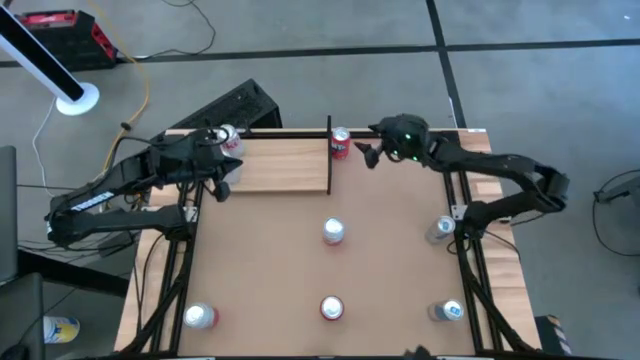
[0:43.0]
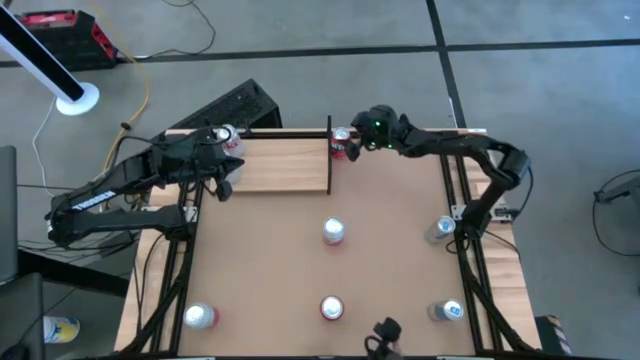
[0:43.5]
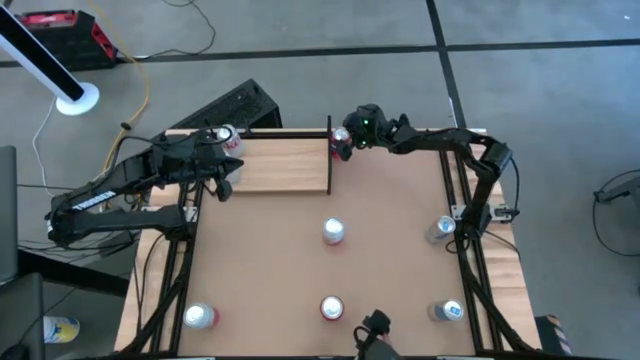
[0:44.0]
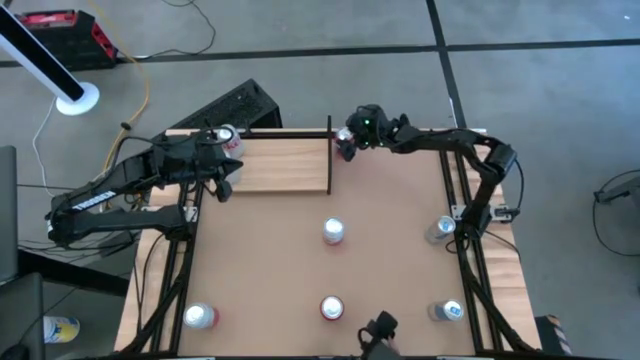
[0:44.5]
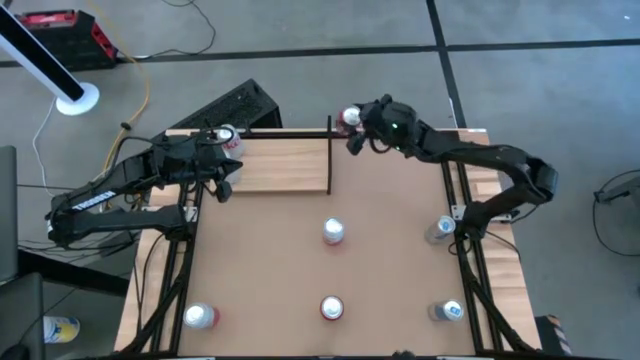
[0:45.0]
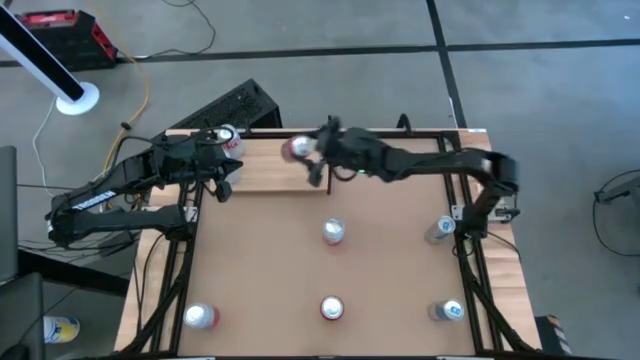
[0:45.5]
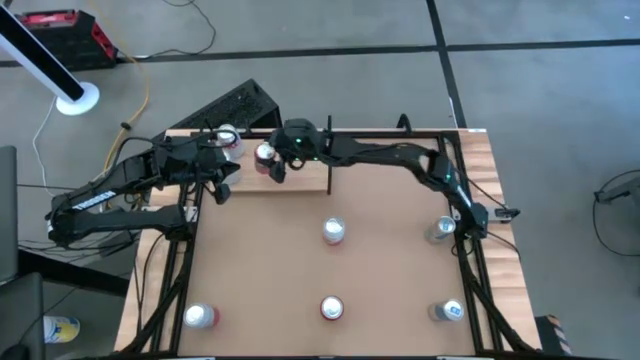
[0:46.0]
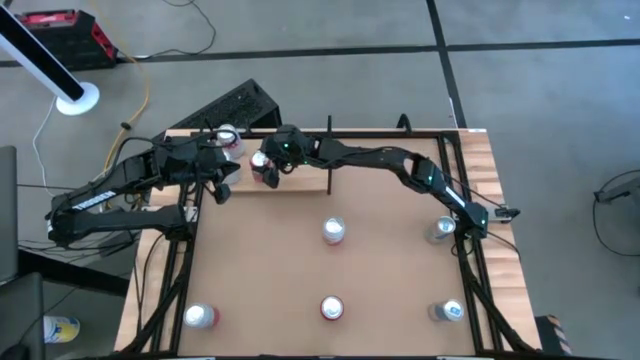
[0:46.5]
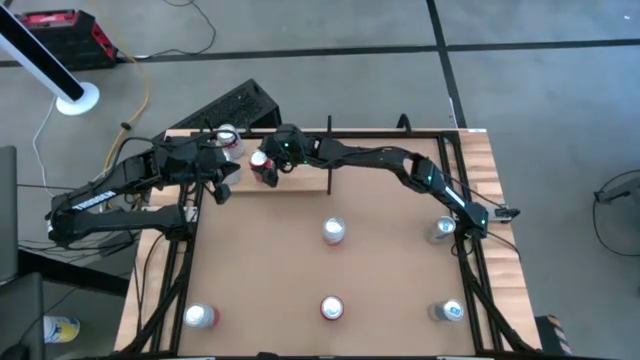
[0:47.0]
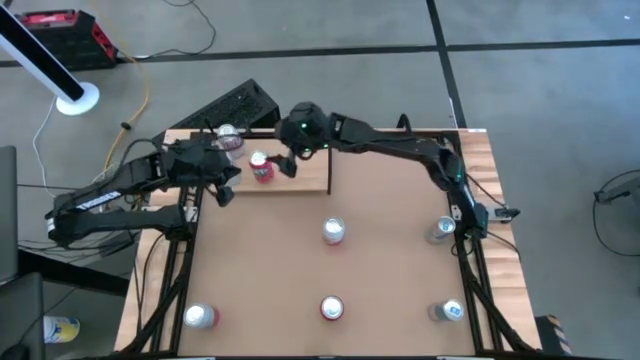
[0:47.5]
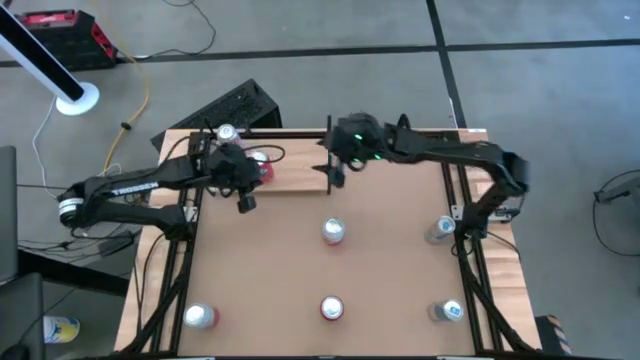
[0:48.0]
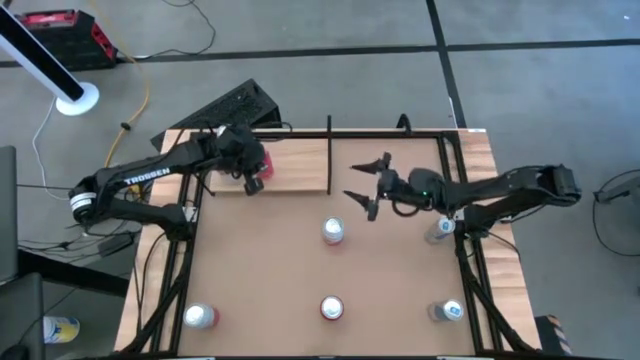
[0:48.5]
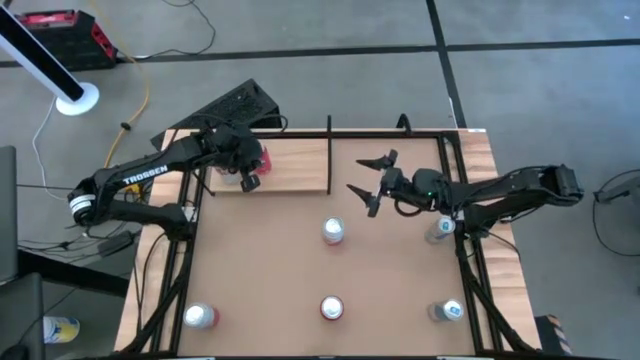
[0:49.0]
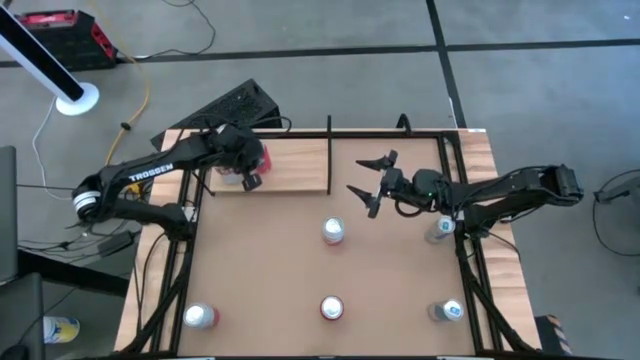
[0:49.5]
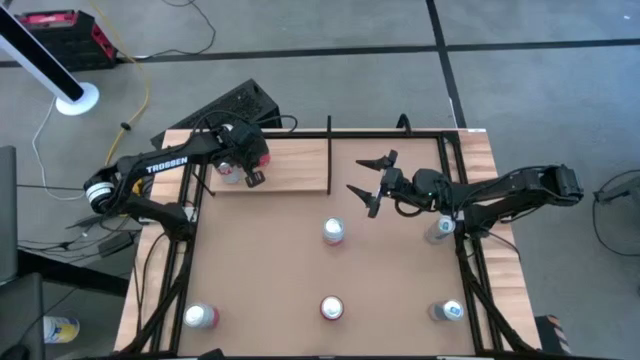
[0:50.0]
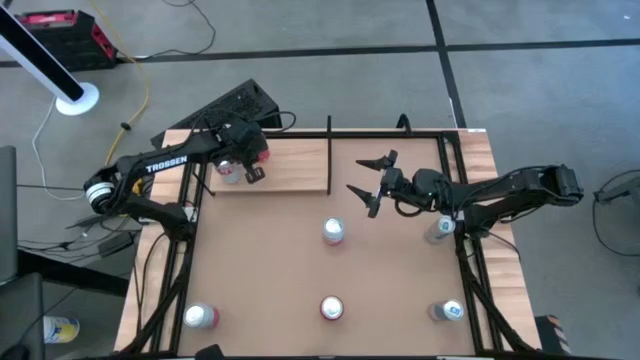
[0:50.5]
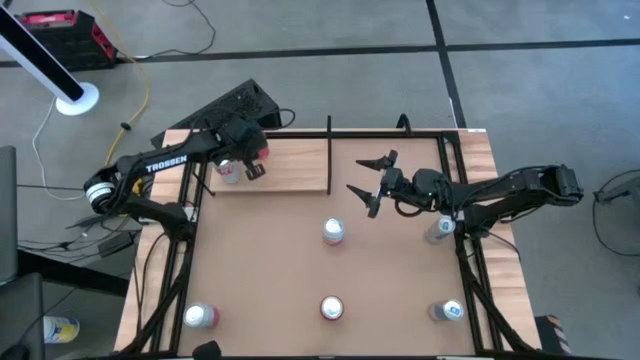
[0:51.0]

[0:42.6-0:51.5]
Task: Place canned beverage on shelf
Put the top pink soda can on the shelf

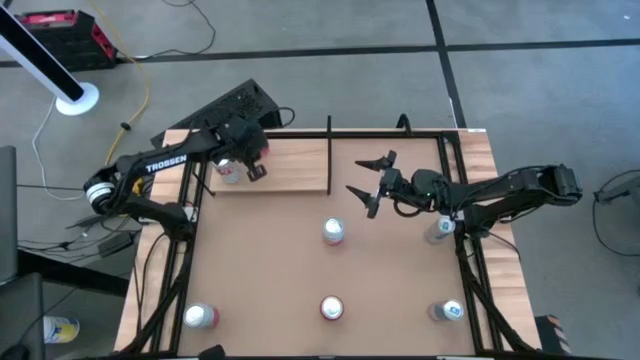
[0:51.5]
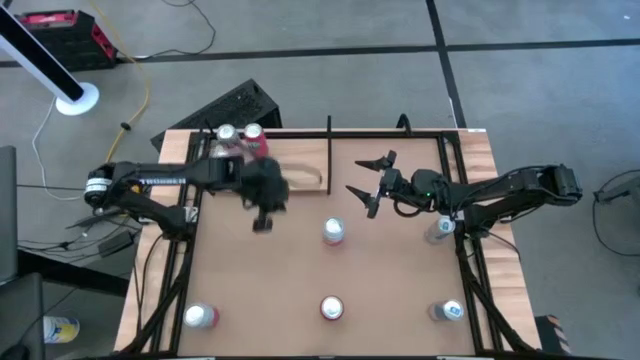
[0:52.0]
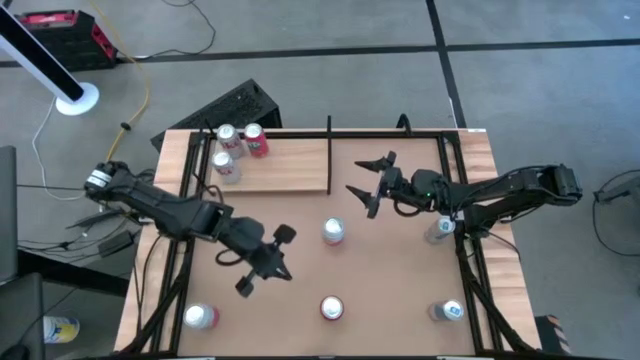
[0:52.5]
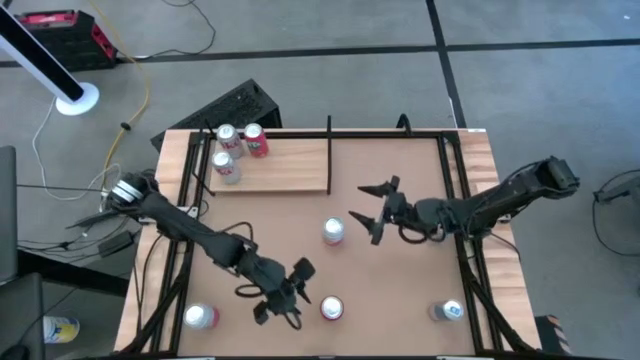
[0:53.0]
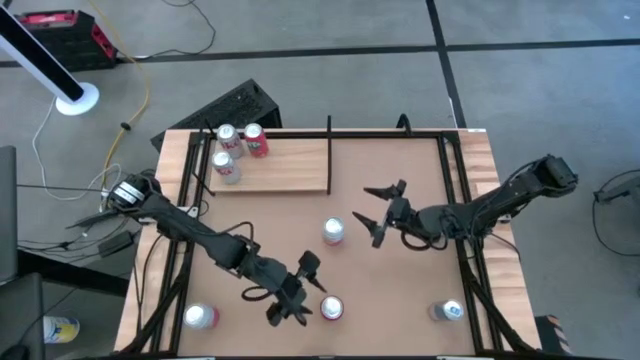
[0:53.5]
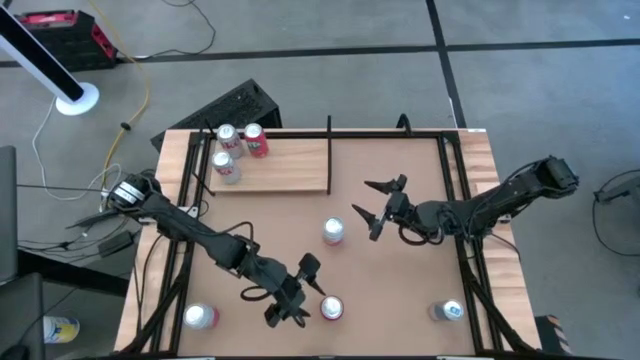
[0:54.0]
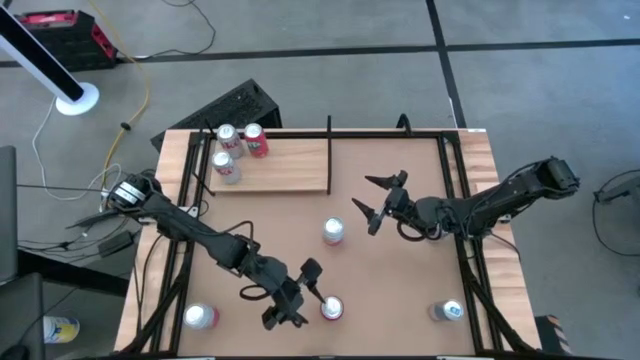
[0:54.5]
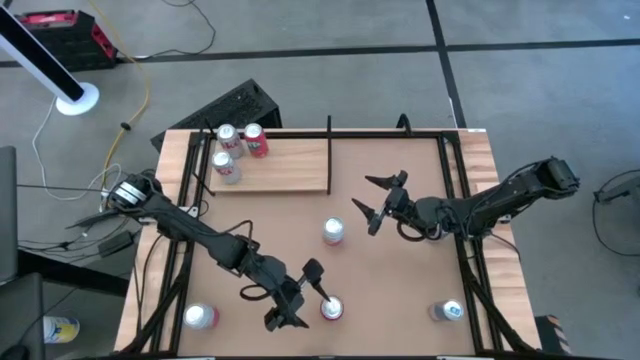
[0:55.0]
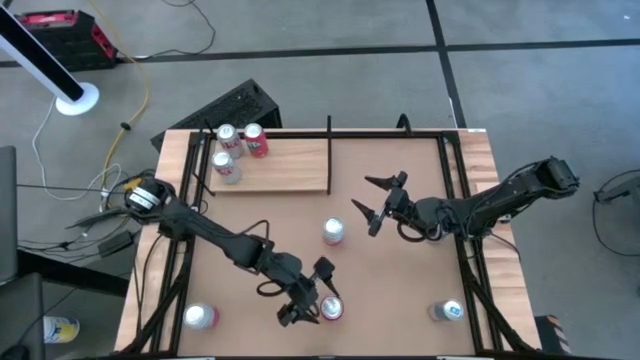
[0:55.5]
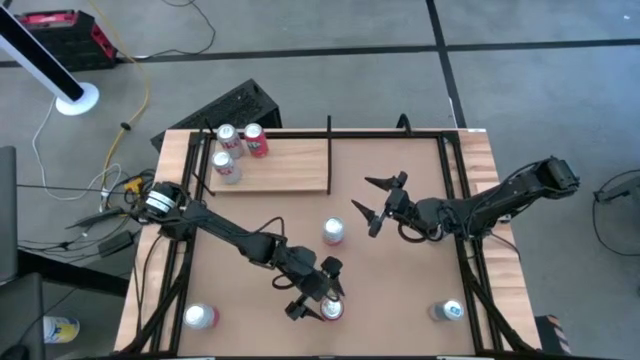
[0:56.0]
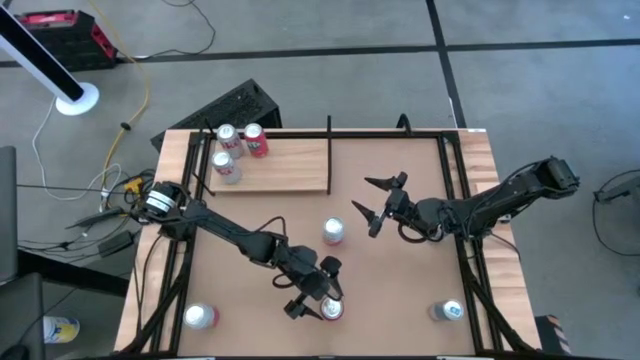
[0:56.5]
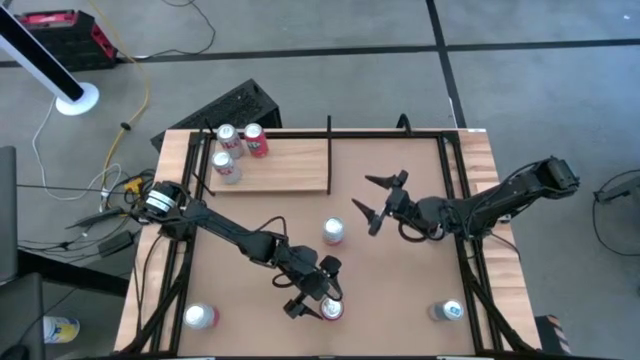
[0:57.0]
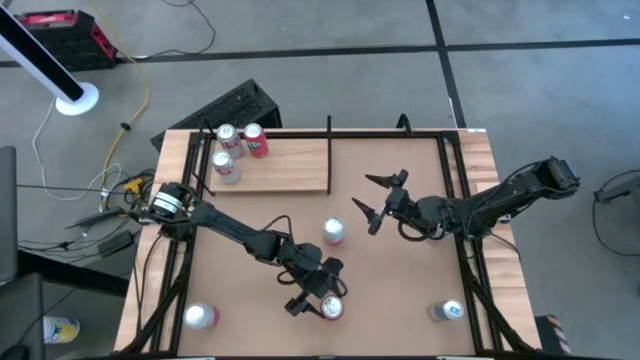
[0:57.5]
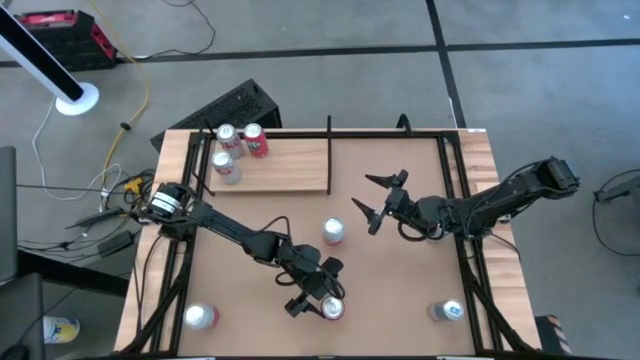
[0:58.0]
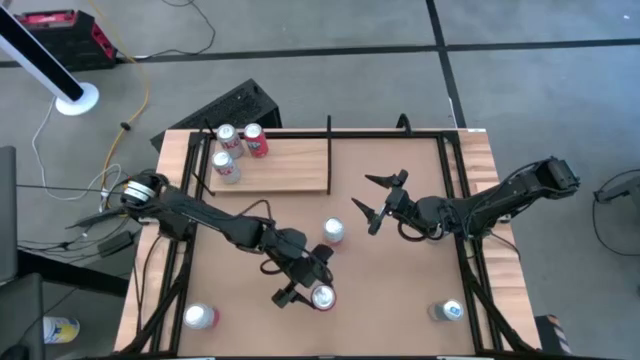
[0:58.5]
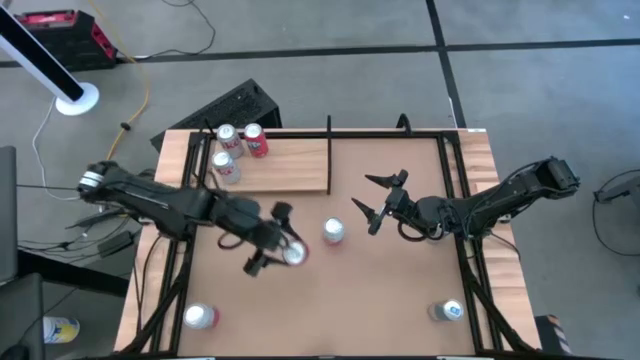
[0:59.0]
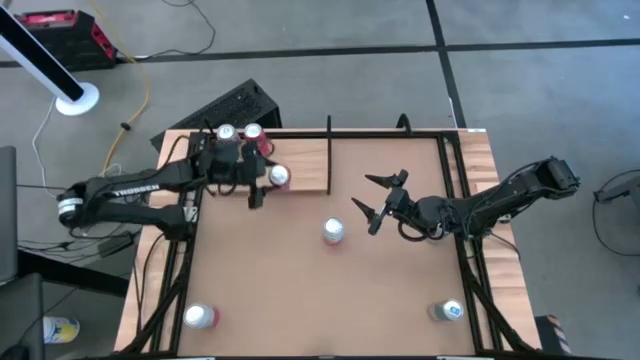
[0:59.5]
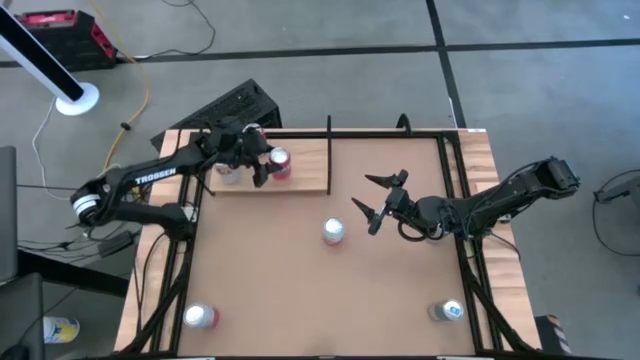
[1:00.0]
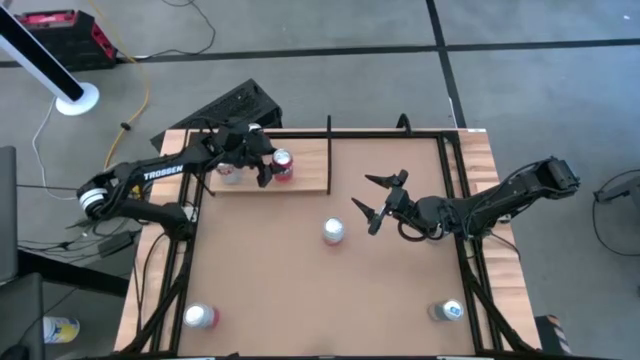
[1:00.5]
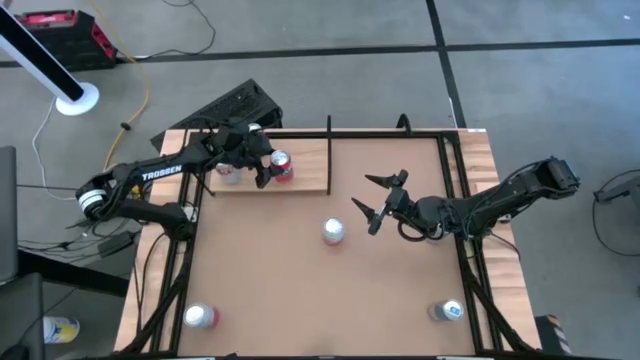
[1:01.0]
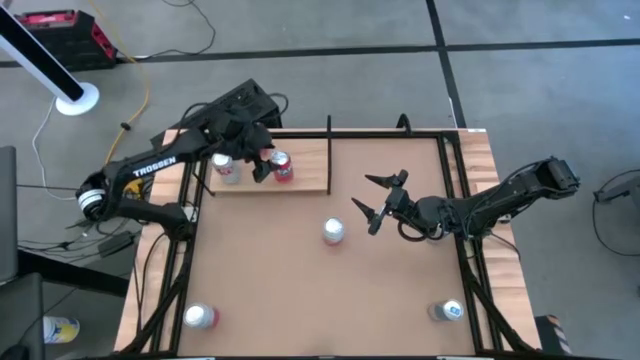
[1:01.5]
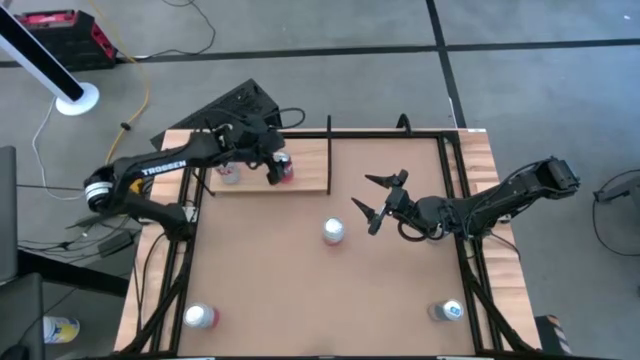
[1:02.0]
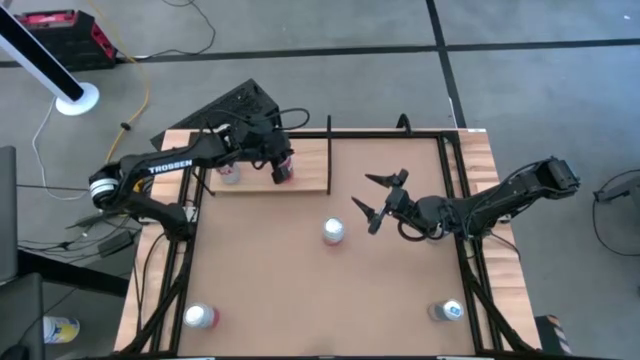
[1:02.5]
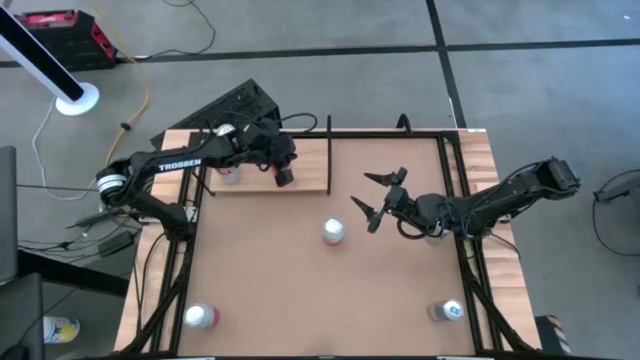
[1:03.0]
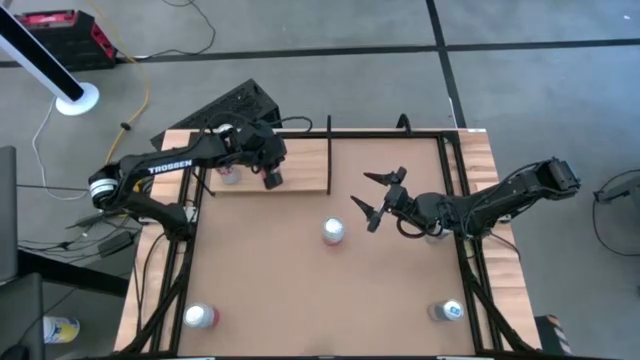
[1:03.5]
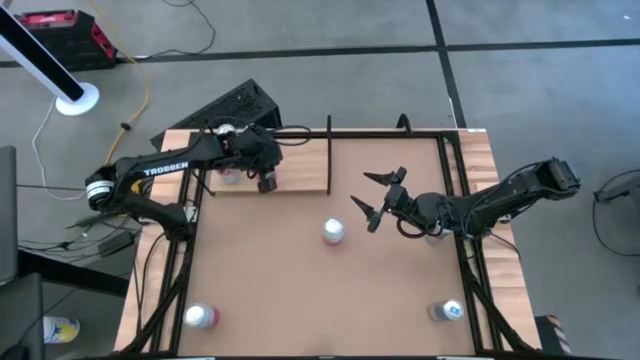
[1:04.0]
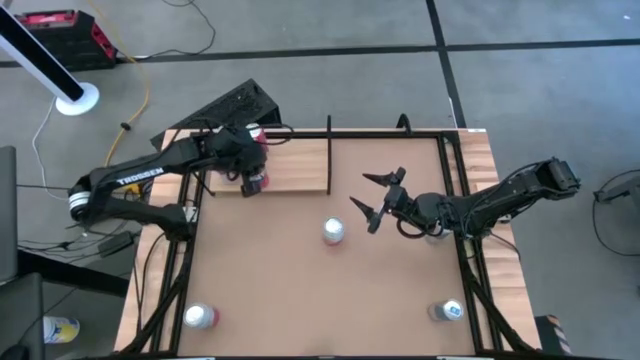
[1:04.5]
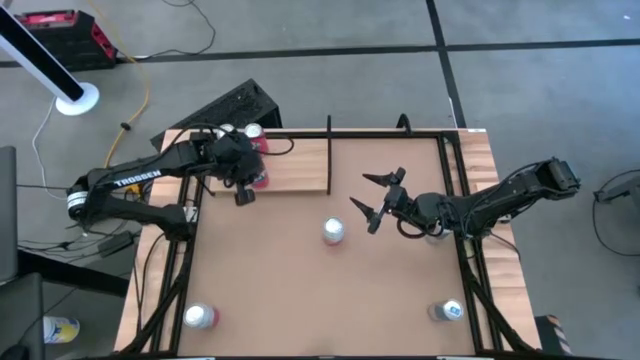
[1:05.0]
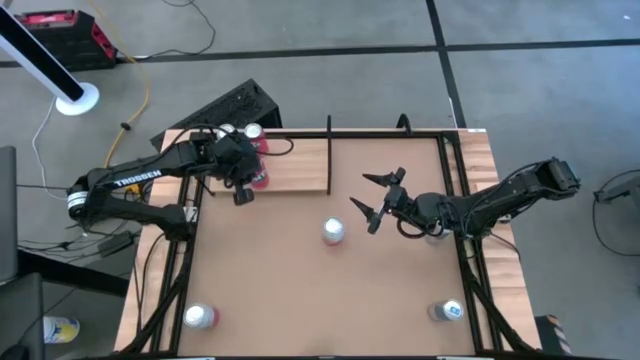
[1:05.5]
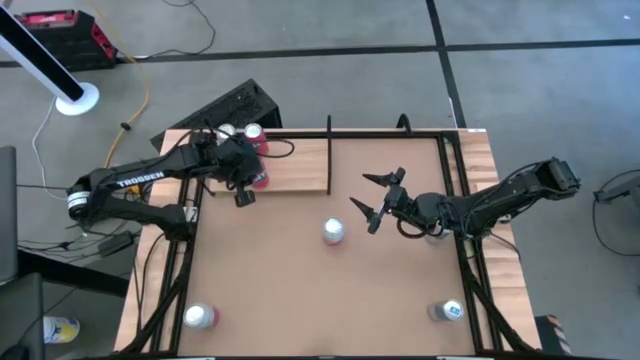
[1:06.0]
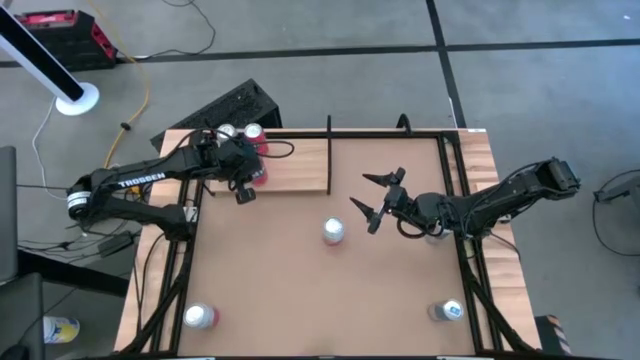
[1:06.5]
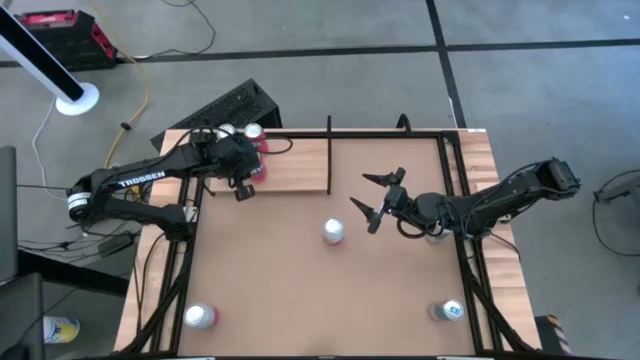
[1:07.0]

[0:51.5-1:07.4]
Put the pink soda can on the shelf aligned with the other pink soda can
